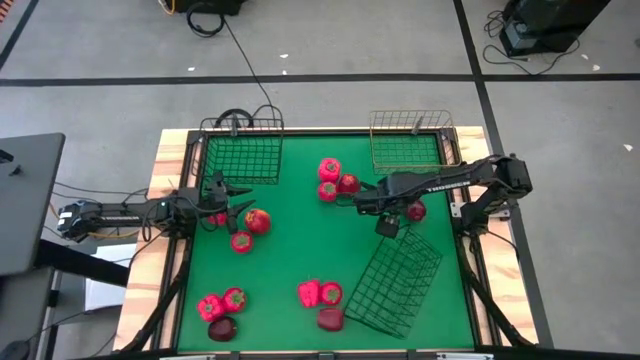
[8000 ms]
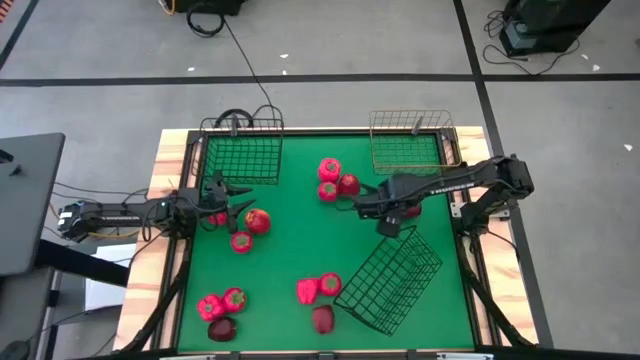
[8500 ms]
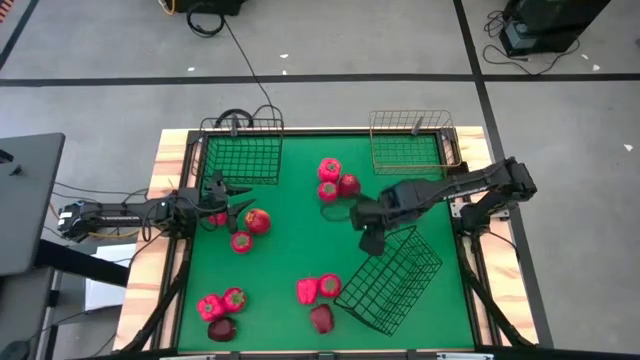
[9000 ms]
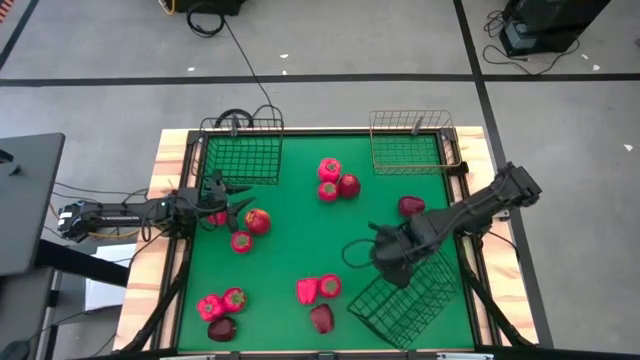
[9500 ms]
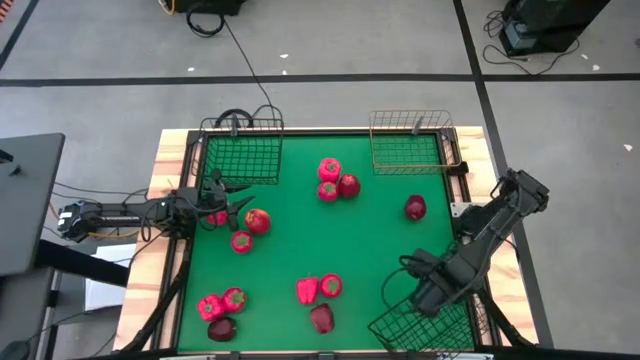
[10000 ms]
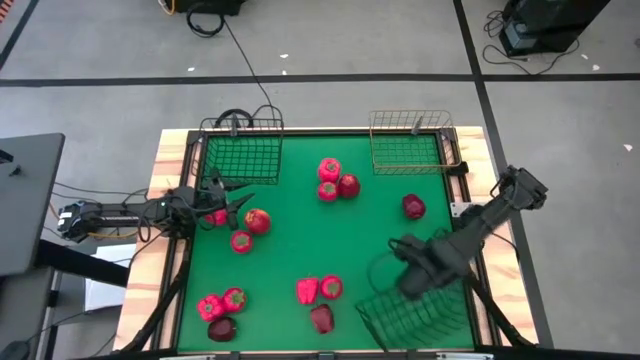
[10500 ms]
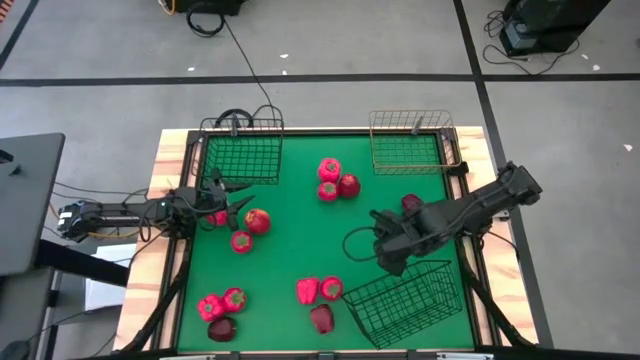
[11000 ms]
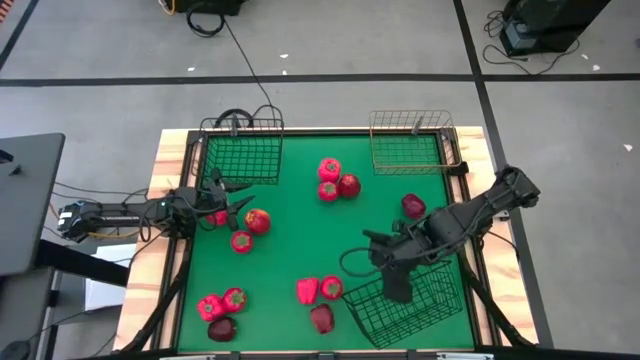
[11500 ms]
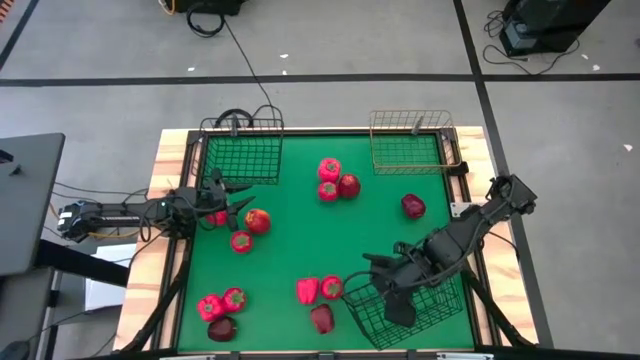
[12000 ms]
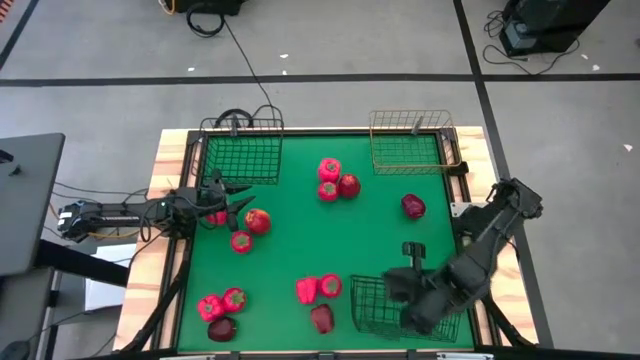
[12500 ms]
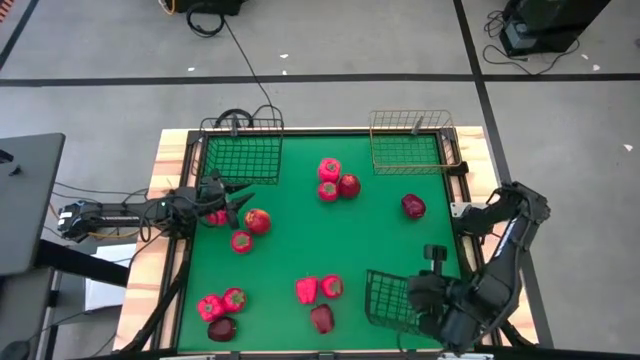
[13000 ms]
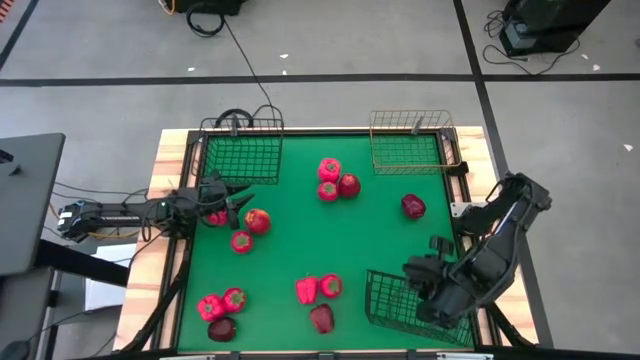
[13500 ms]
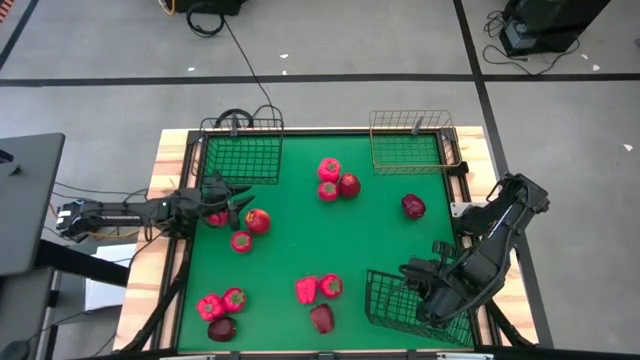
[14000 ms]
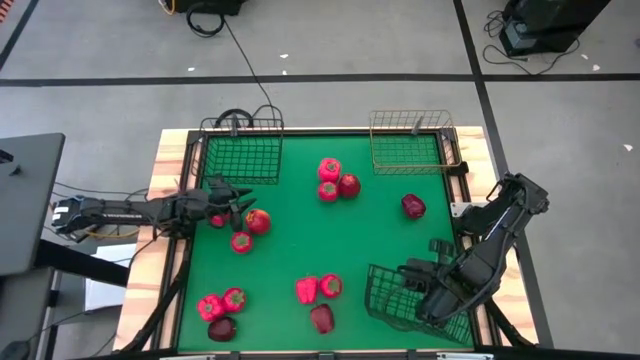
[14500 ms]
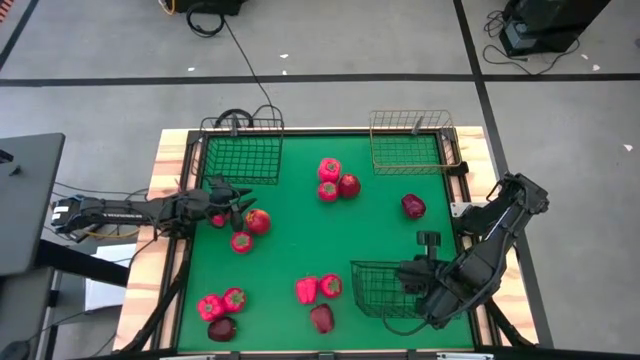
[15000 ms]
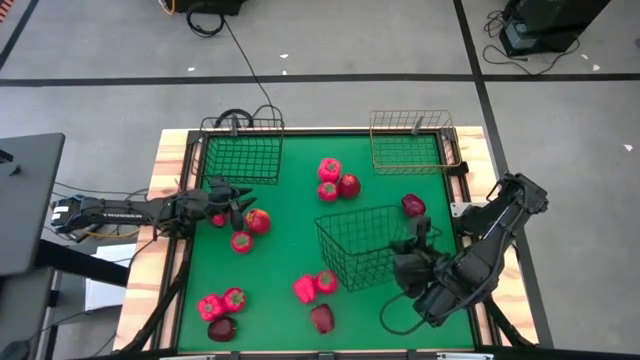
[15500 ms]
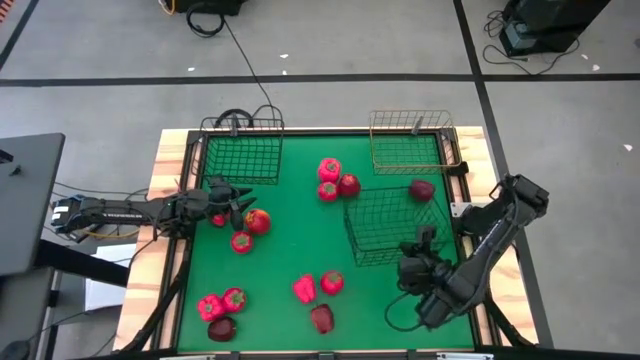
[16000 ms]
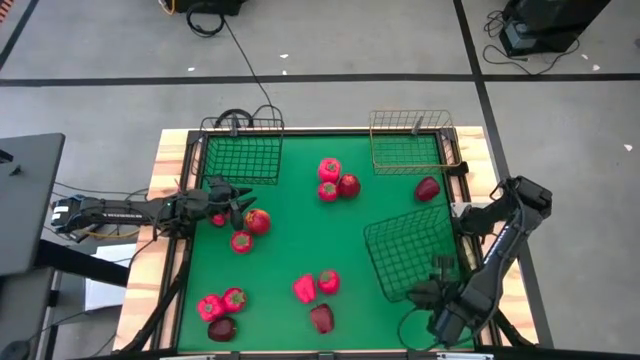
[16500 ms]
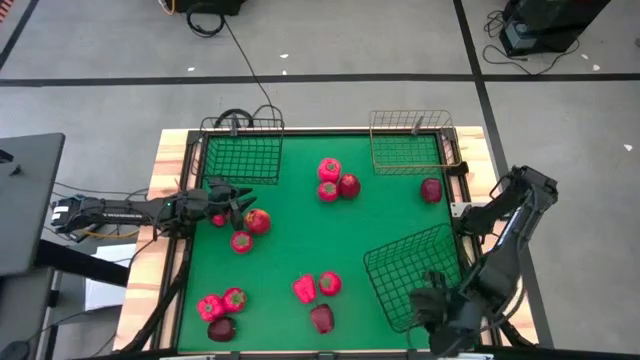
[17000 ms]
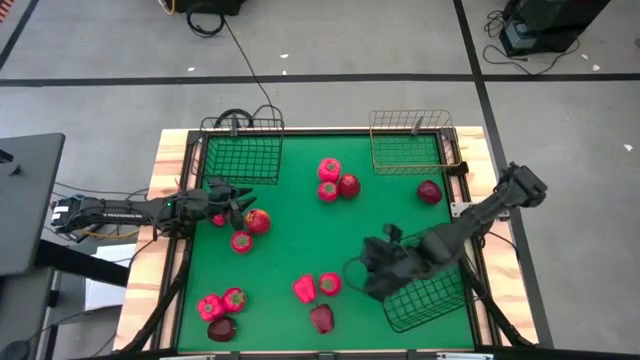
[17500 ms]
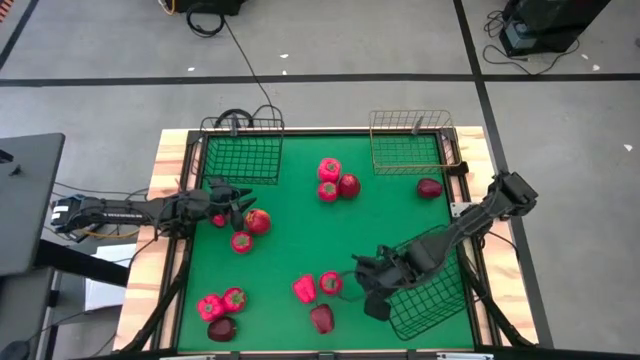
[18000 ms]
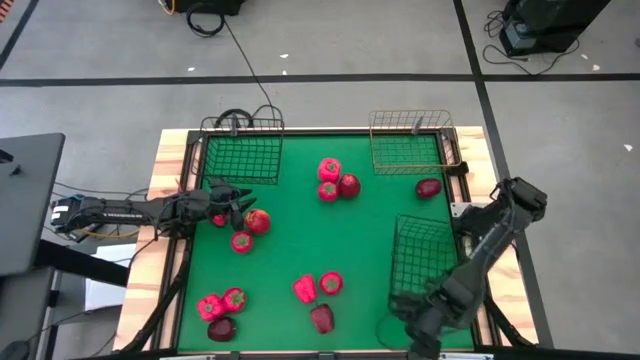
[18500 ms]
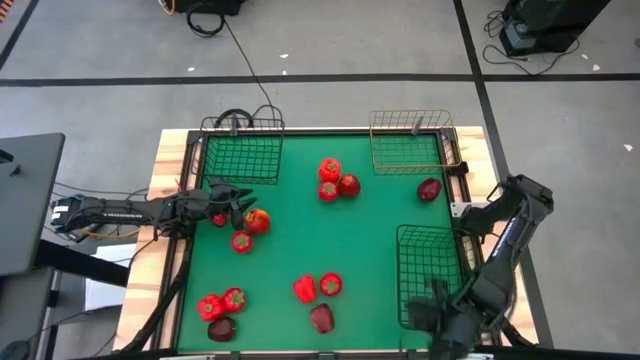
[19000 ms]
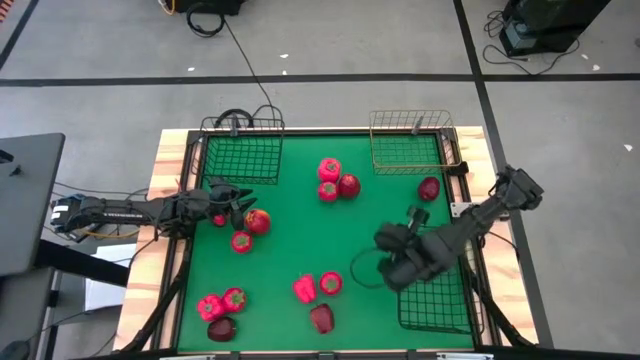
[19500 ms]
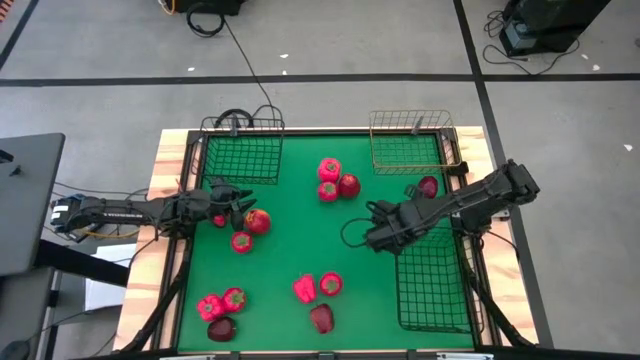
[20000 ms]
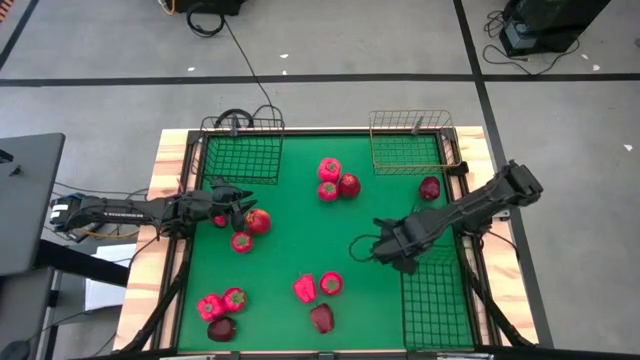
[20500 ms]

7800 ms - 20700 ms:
Task: Sort produce into baskets
Adjust the bottom black wire basket

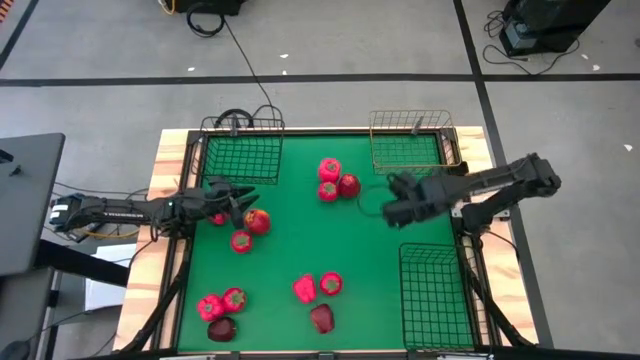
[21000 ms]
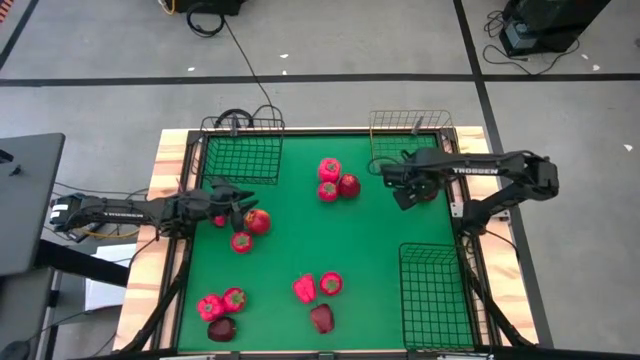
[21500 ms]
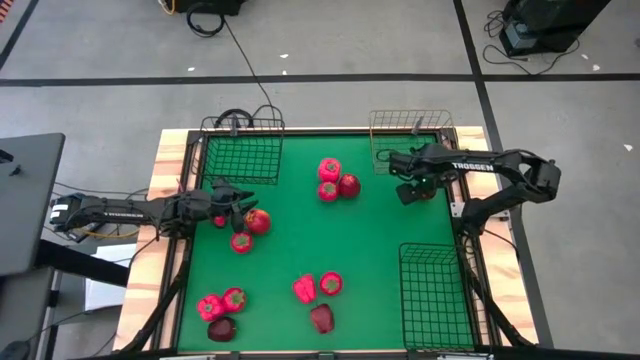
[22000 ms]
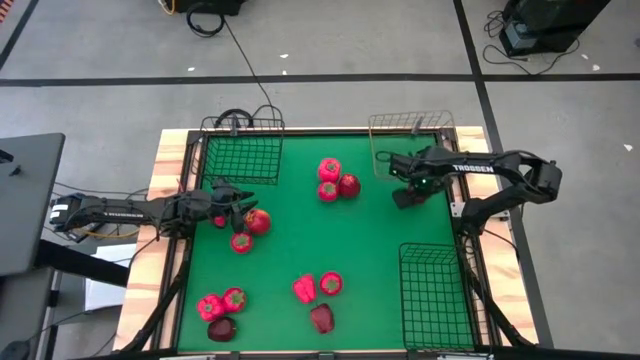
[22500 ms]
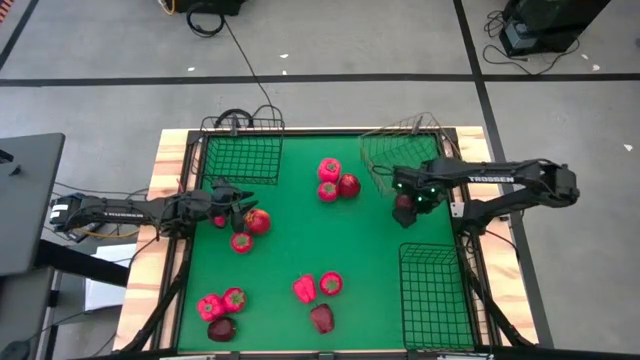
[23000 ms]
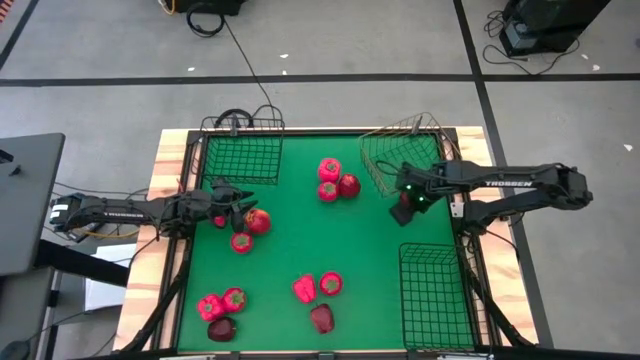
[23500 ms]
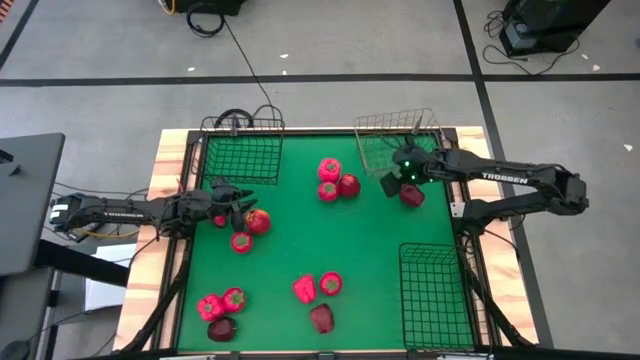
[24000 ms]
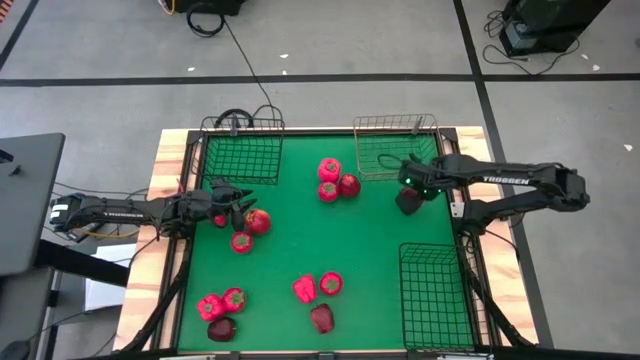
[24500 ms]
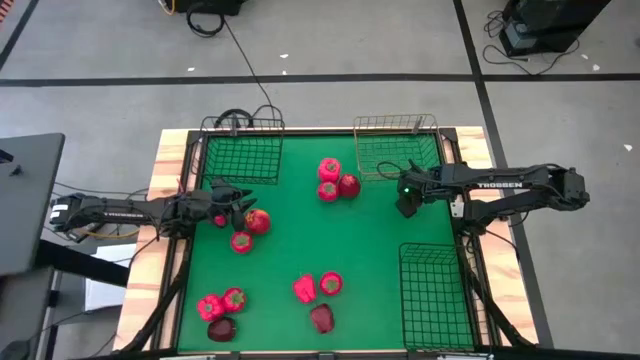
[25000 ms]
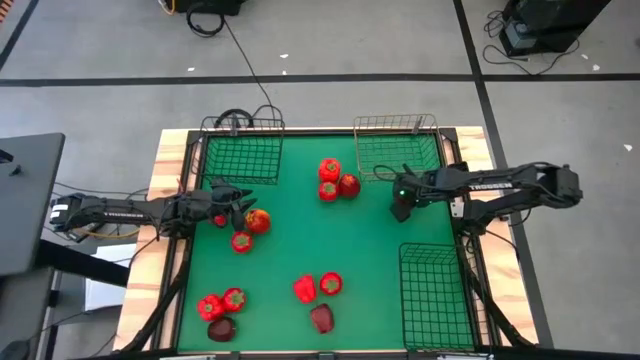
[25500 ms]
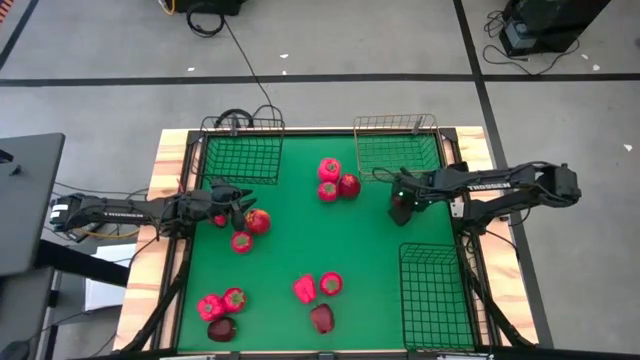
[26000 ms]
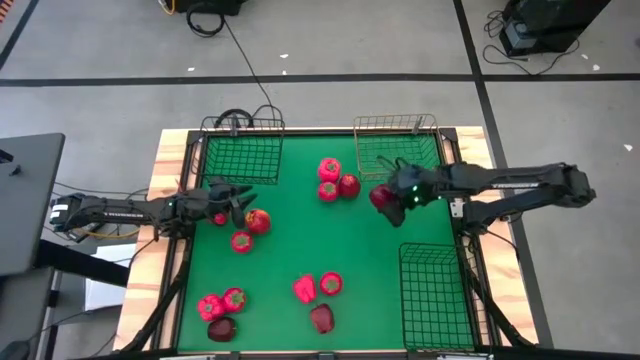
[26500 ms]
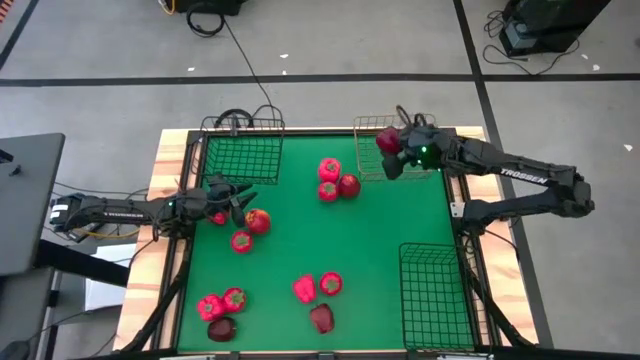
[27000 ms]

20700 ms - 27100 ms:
Put the red apple into the gold wire basket

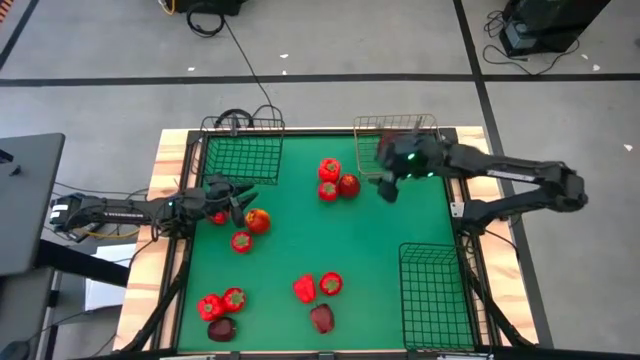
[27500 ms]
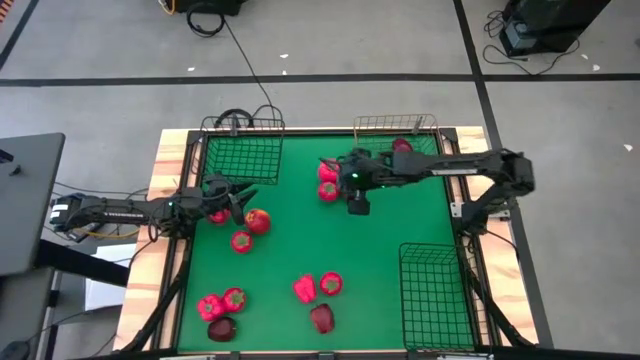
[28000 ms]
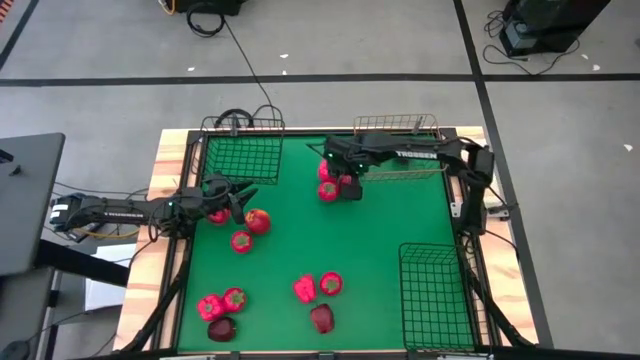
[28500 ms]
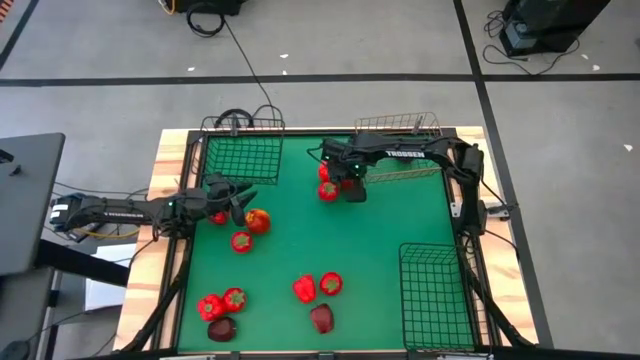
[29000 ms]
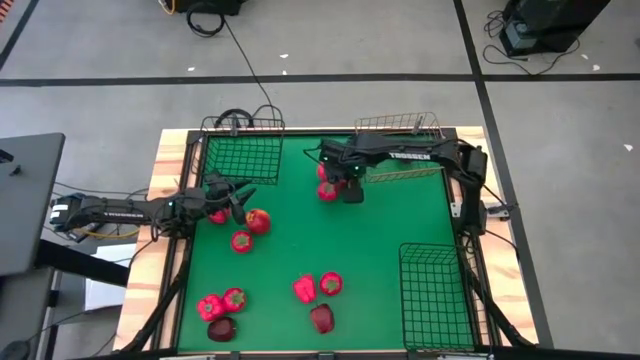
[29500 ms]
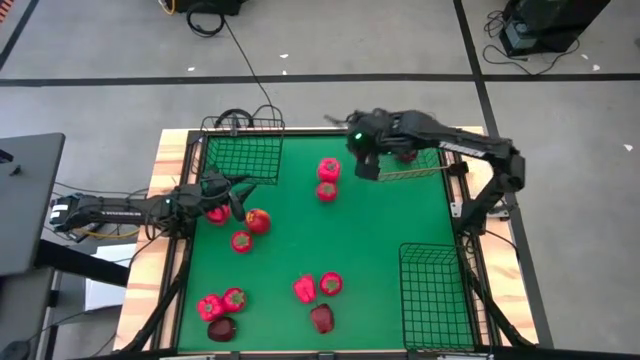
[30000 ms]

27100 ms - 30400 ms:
Put the red apple into the gold wire basket
